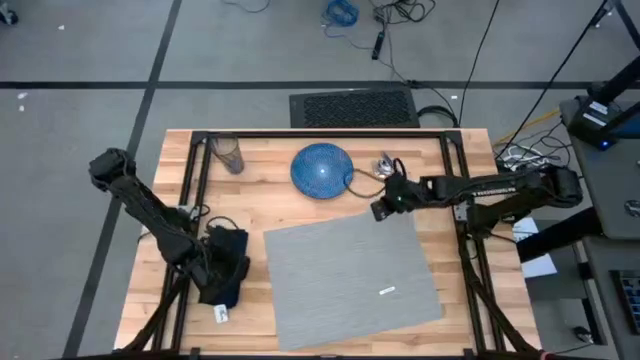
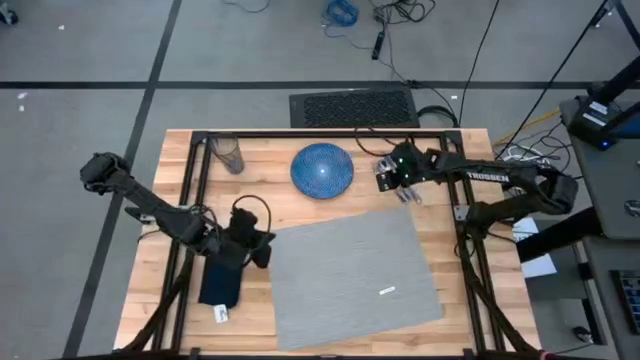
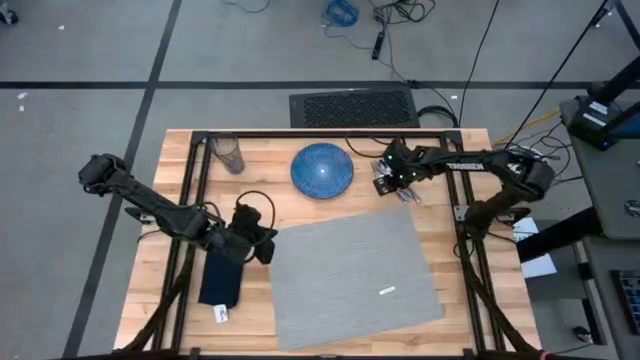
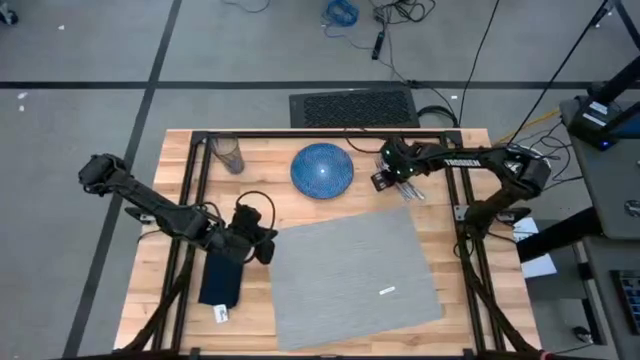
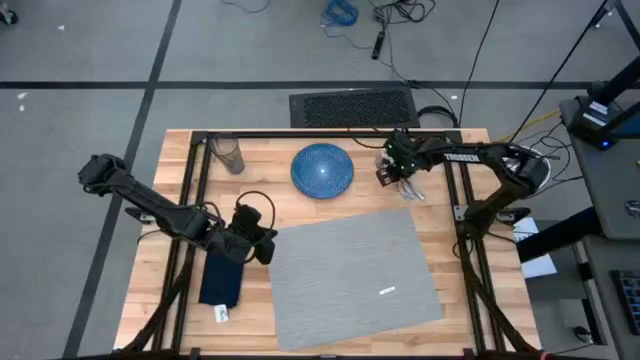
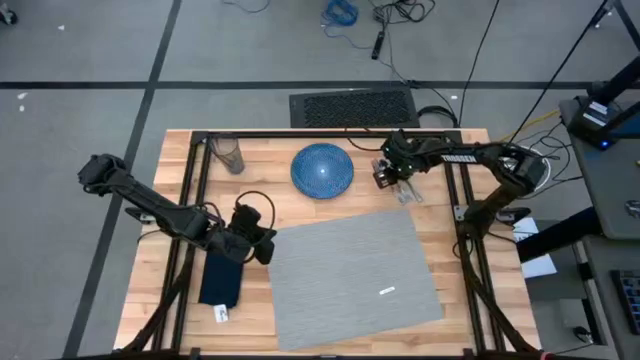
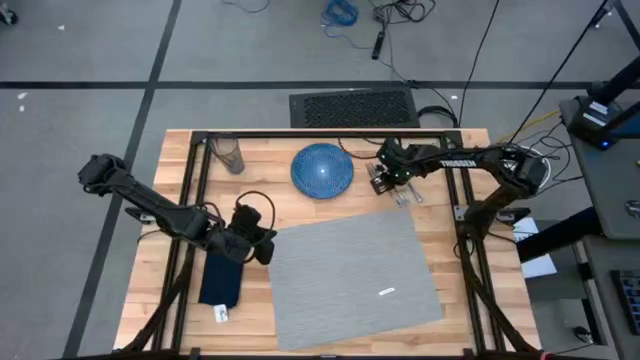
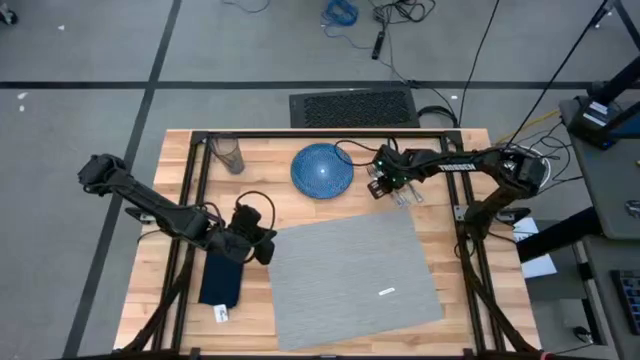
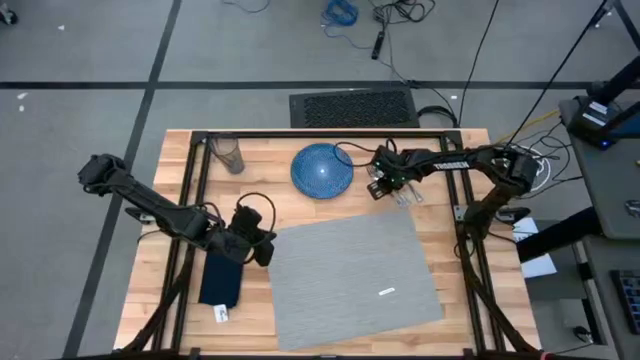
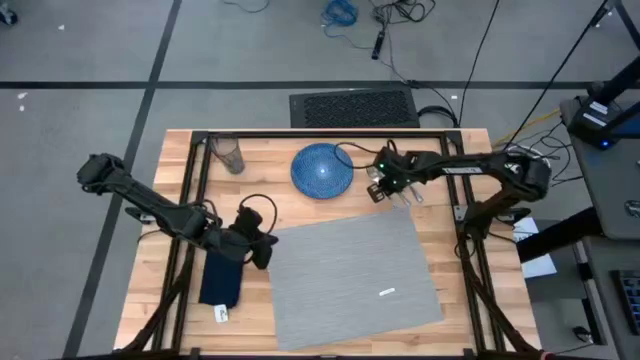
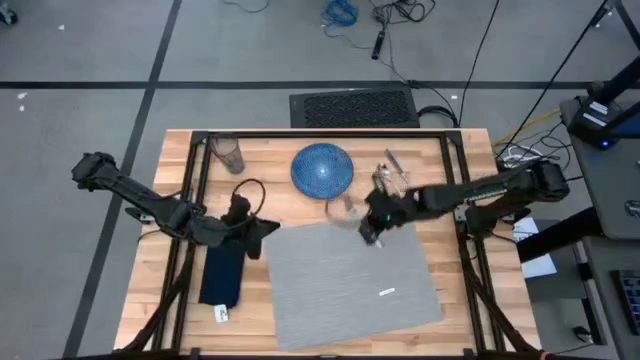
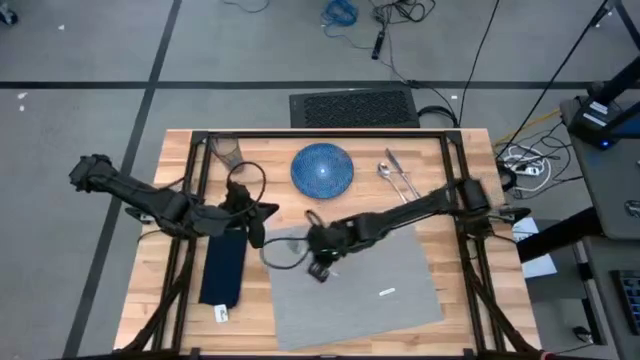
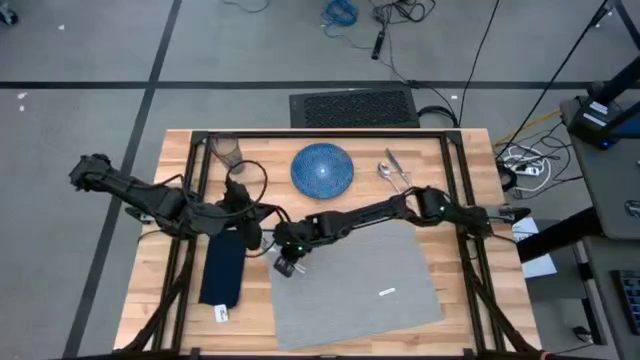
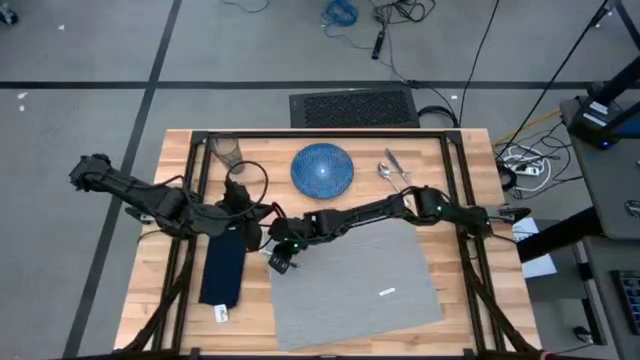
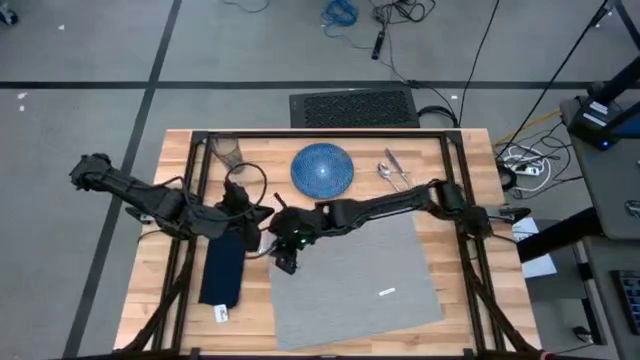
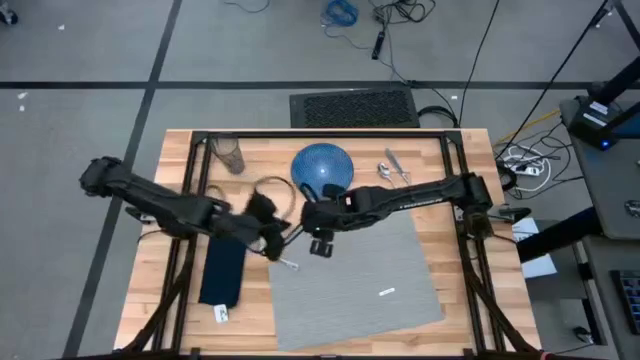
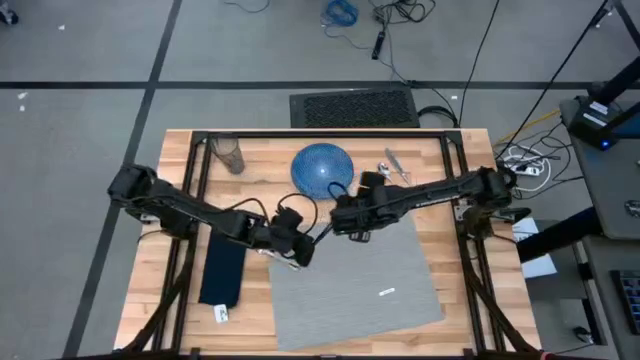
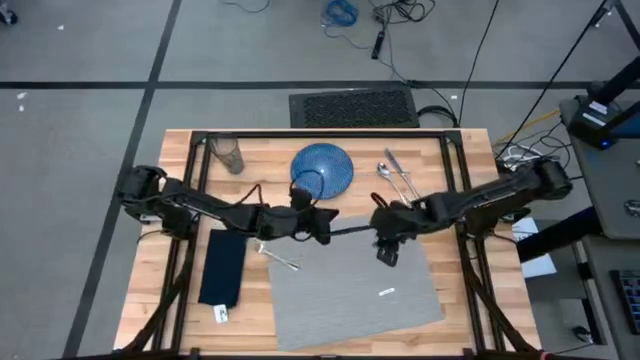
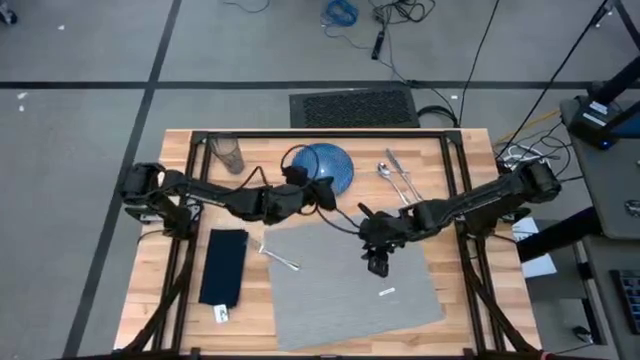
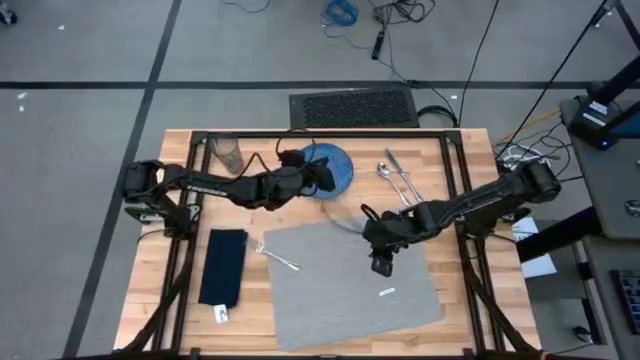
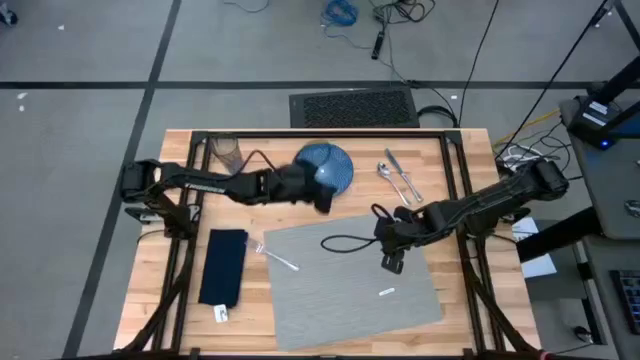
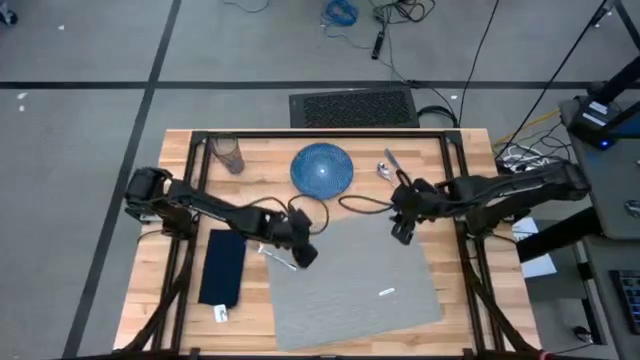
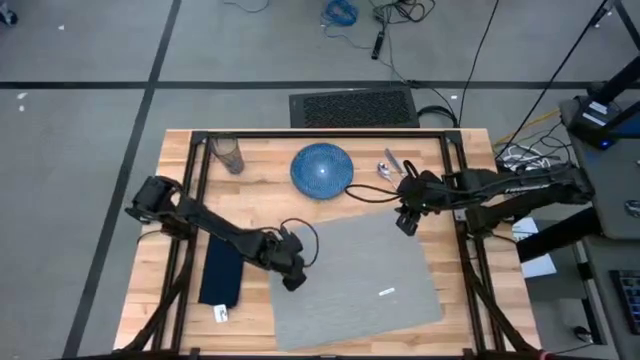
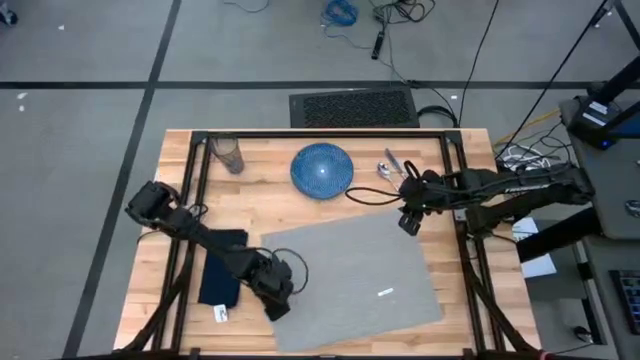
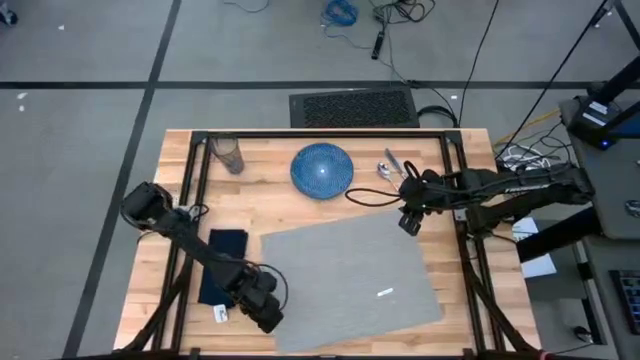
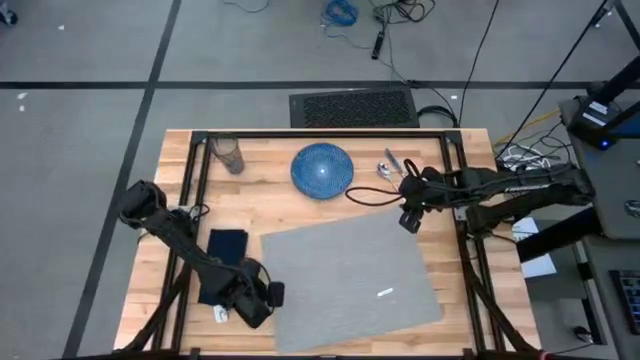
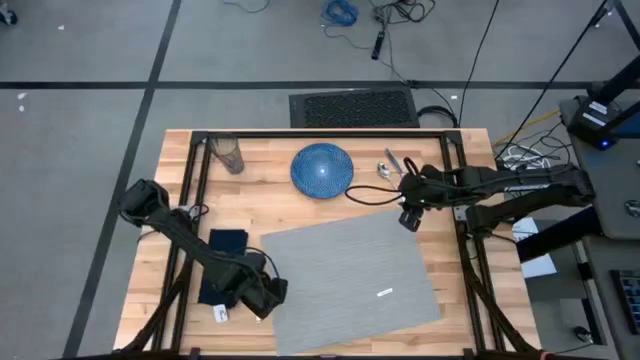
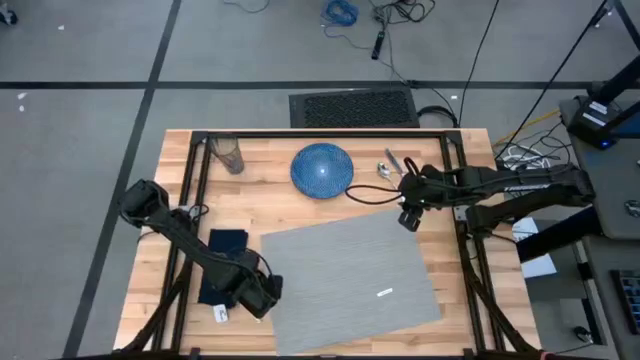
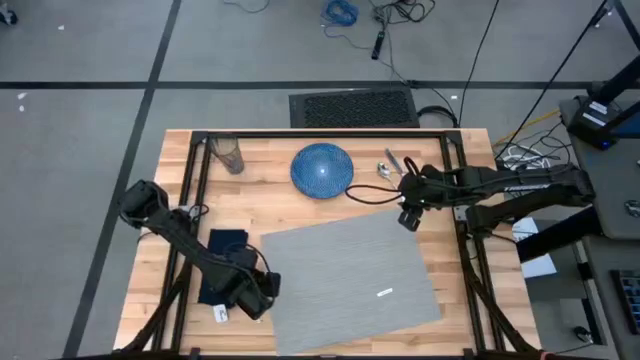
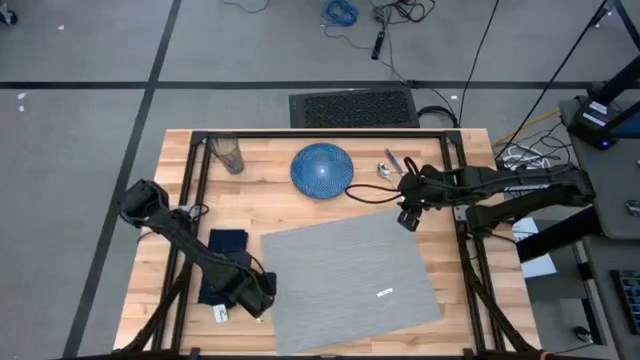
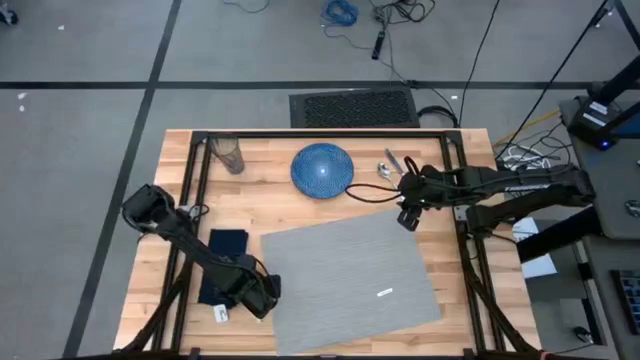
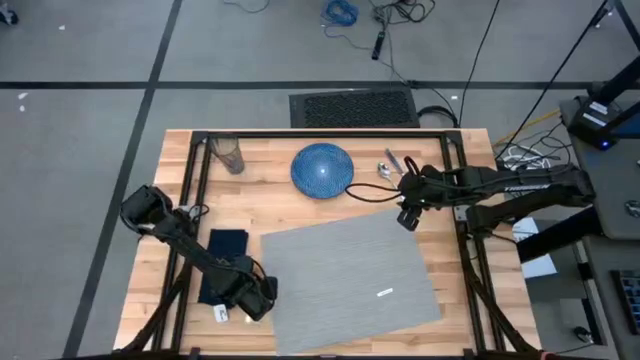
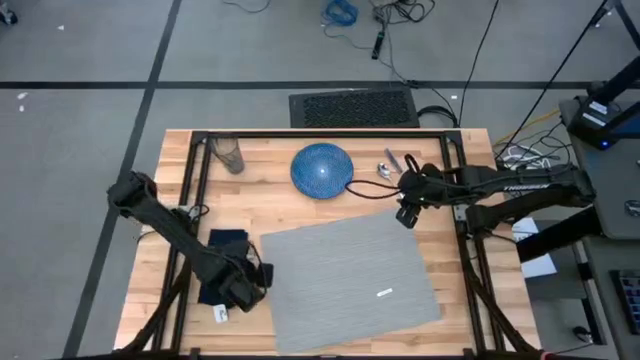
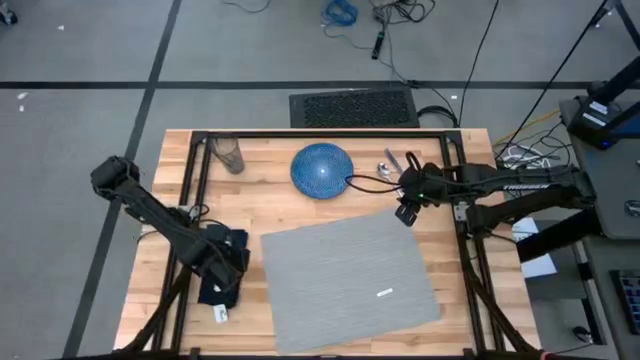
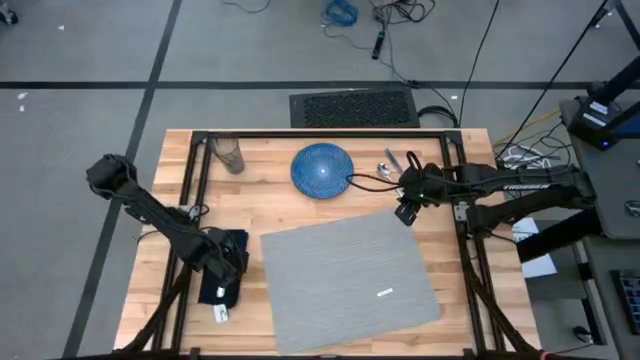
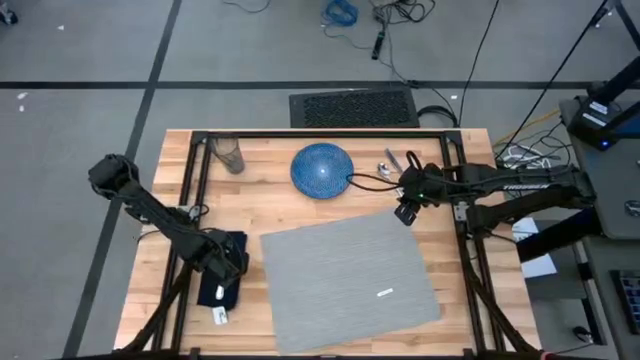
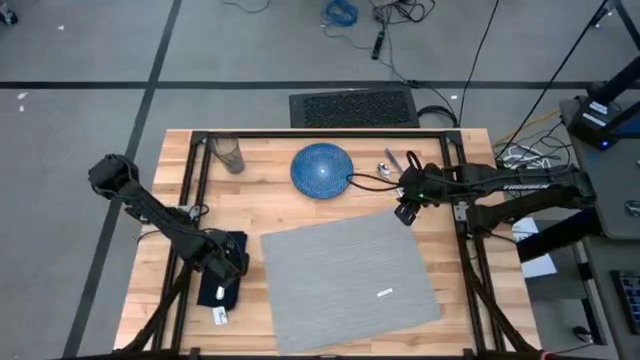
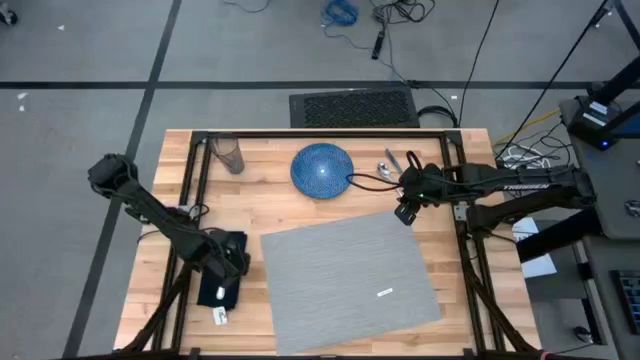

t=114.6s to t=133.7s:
Task: Set table place
Put the silver fork on the blue table napkin

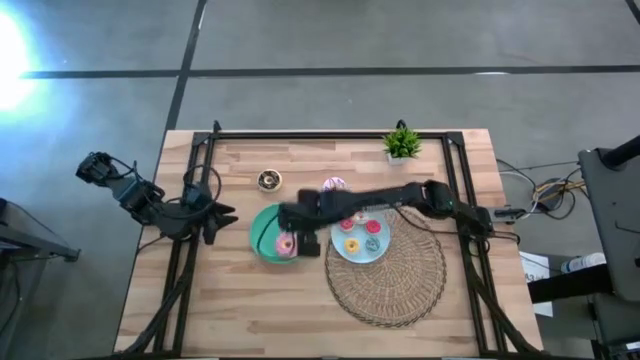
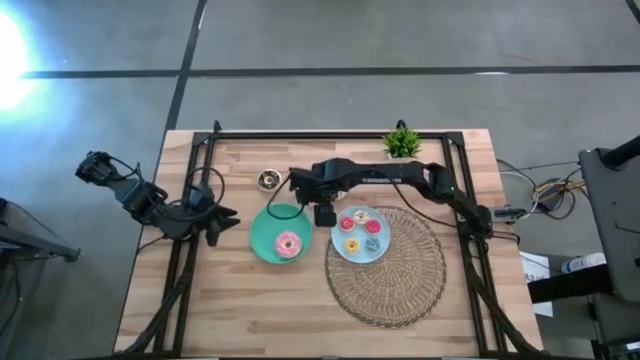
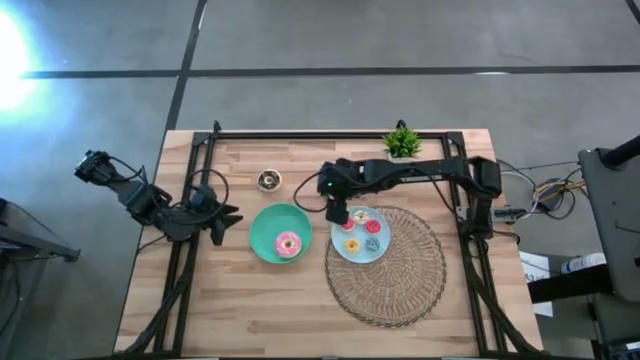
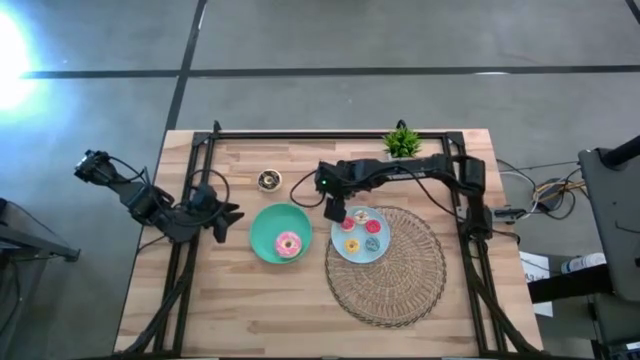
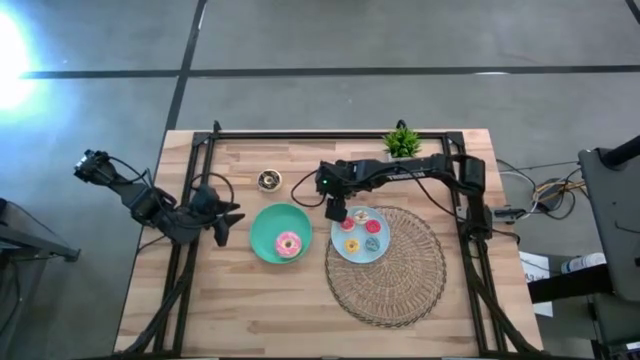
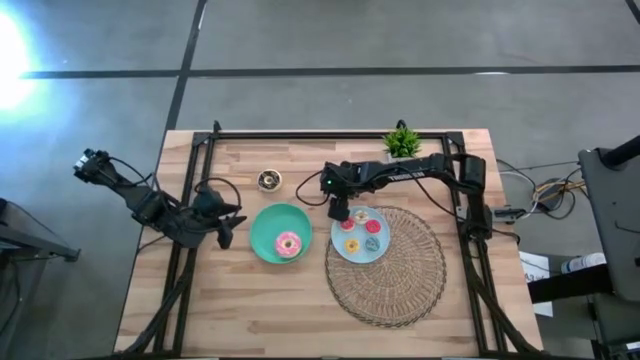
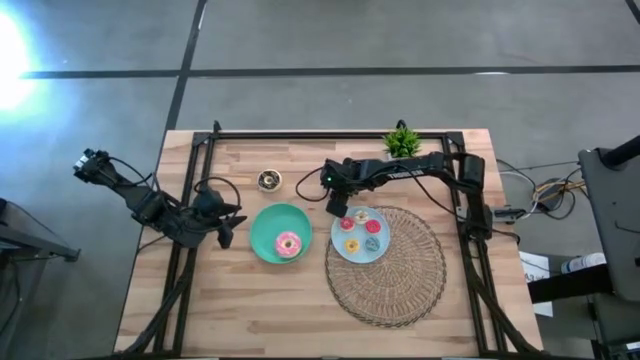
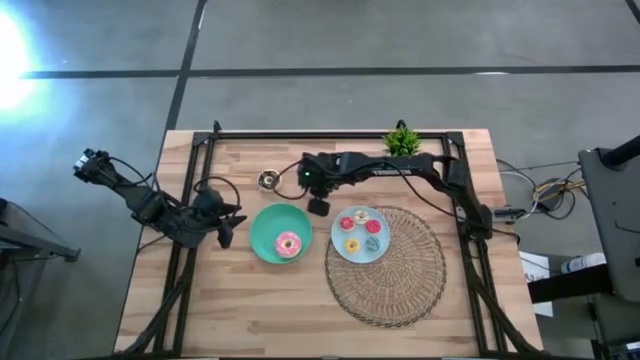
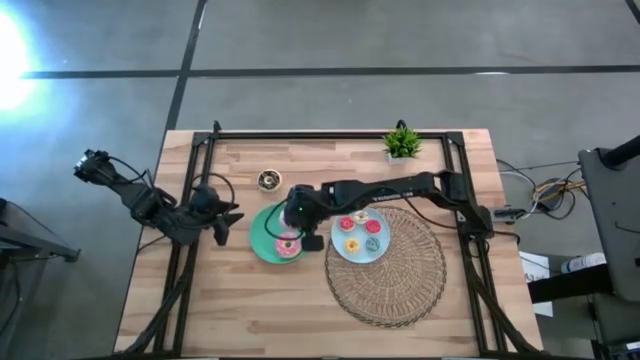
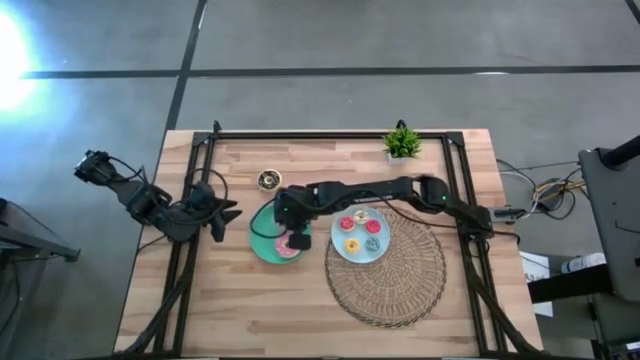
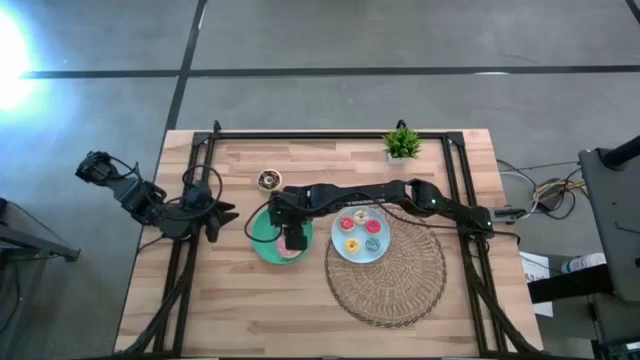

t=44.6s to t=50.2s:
Task: Pick & Place donuts
Put the large purple donut on the green plate
